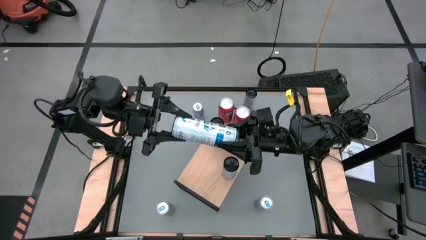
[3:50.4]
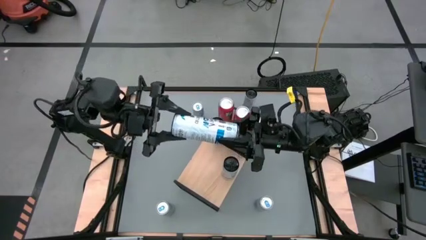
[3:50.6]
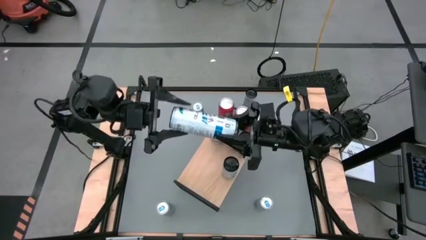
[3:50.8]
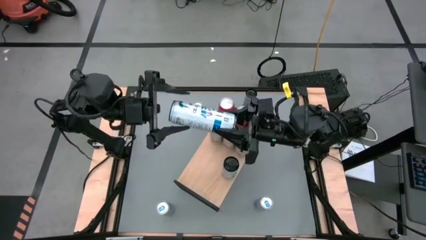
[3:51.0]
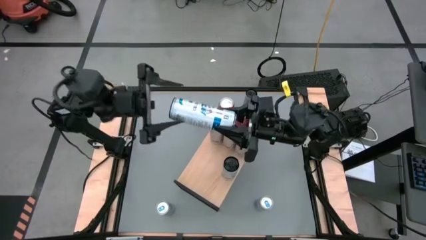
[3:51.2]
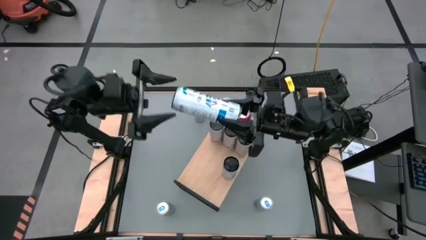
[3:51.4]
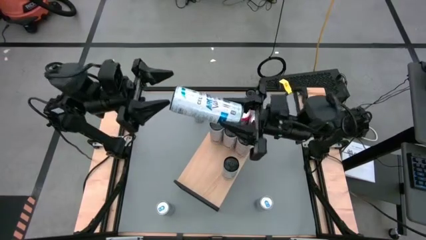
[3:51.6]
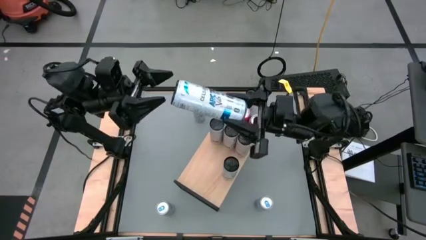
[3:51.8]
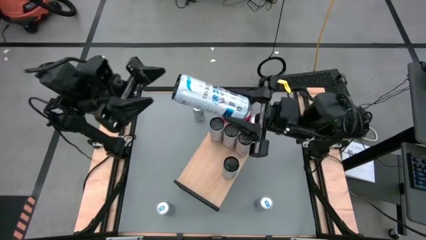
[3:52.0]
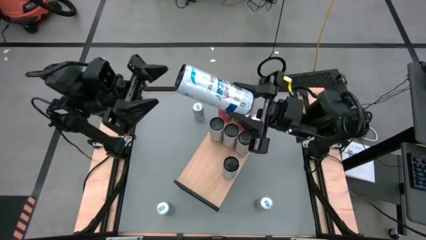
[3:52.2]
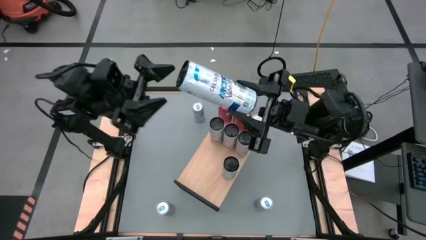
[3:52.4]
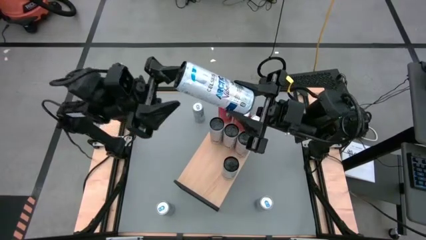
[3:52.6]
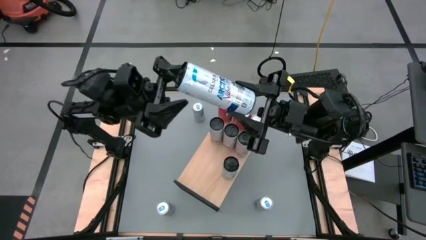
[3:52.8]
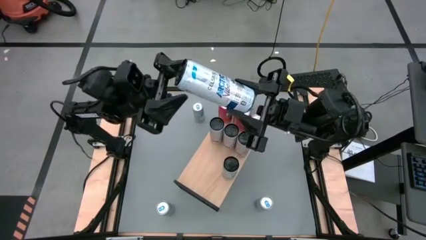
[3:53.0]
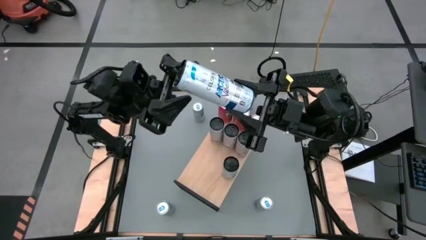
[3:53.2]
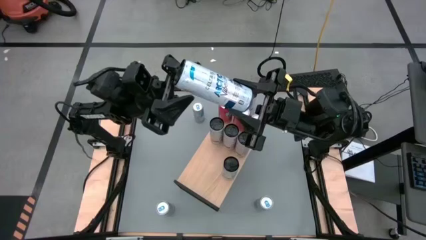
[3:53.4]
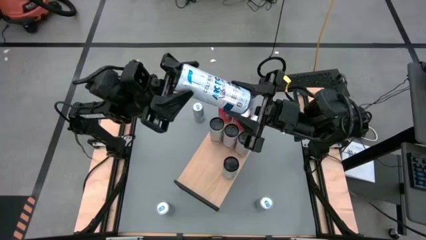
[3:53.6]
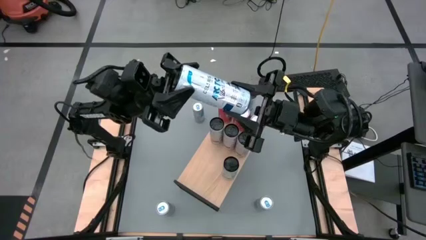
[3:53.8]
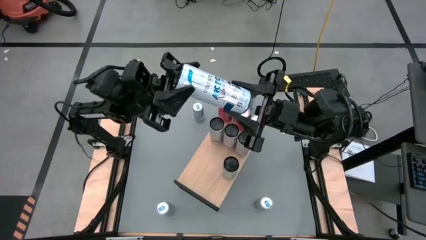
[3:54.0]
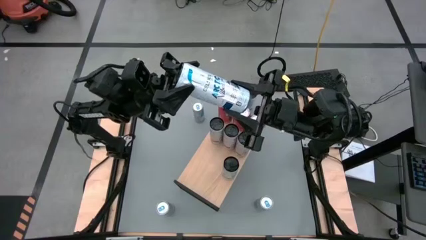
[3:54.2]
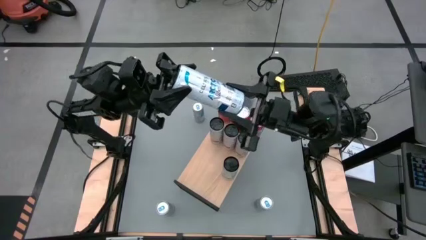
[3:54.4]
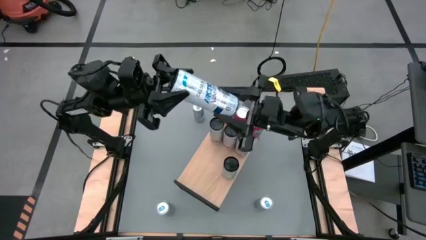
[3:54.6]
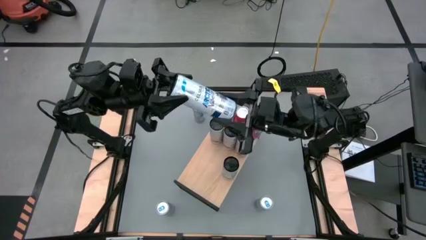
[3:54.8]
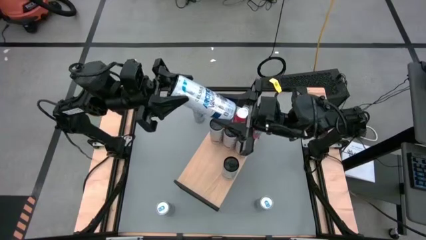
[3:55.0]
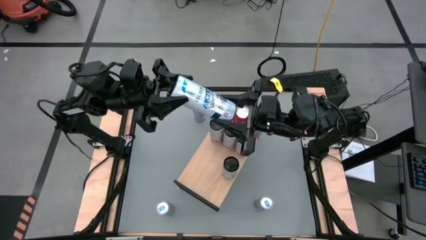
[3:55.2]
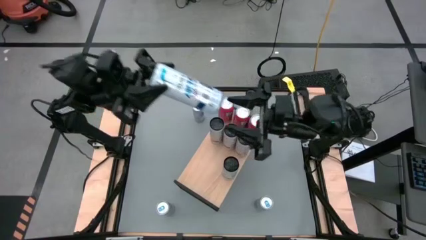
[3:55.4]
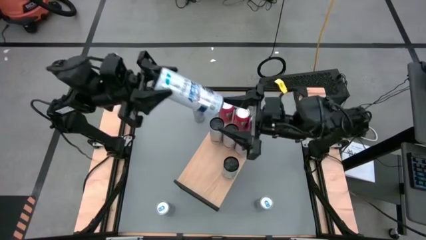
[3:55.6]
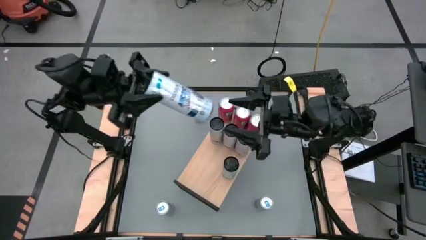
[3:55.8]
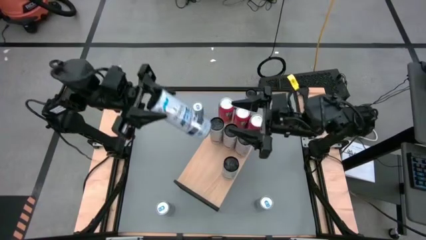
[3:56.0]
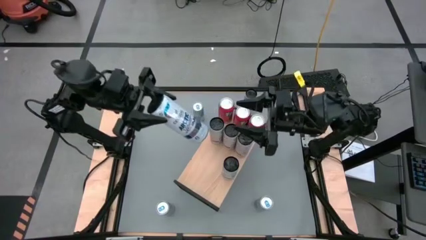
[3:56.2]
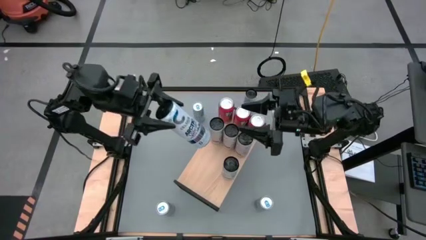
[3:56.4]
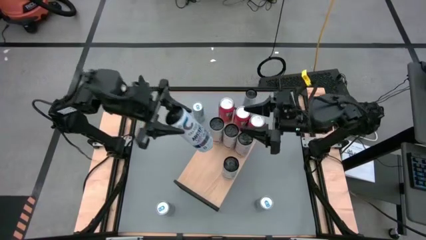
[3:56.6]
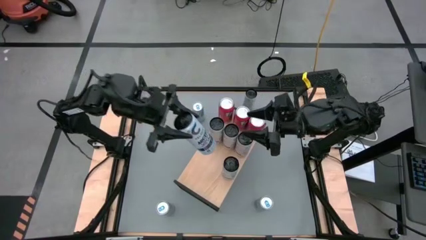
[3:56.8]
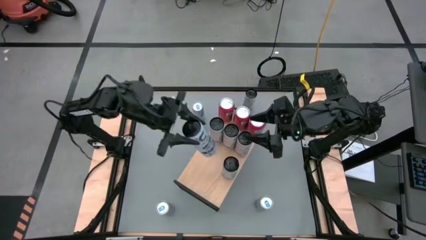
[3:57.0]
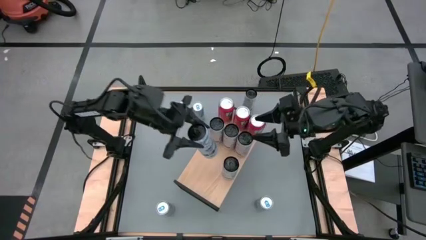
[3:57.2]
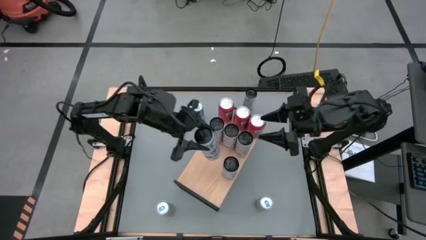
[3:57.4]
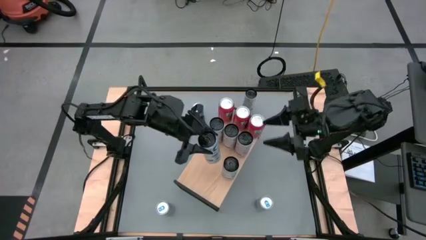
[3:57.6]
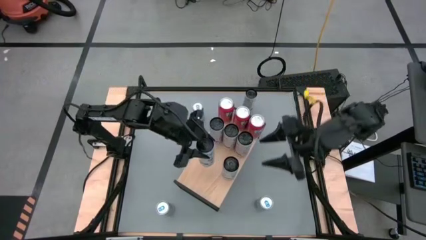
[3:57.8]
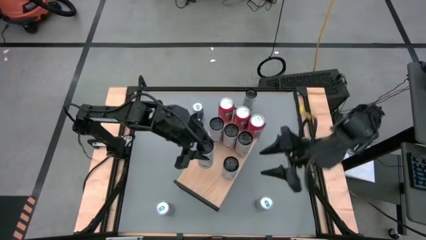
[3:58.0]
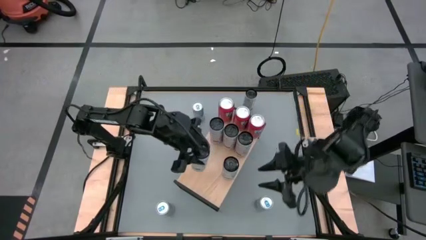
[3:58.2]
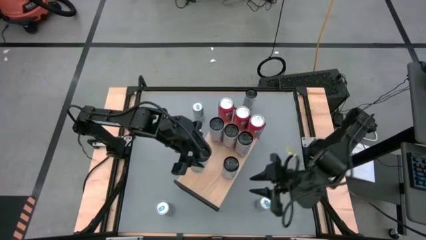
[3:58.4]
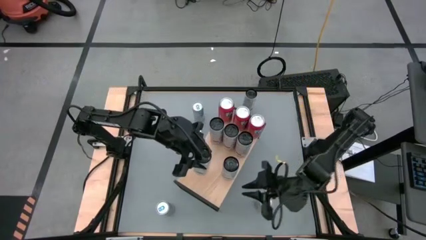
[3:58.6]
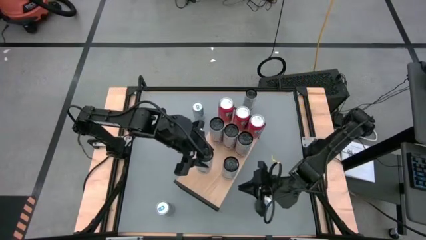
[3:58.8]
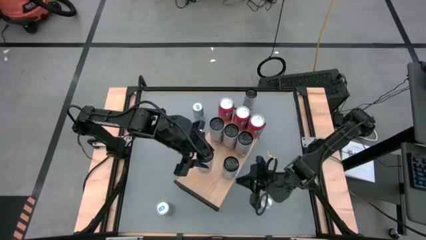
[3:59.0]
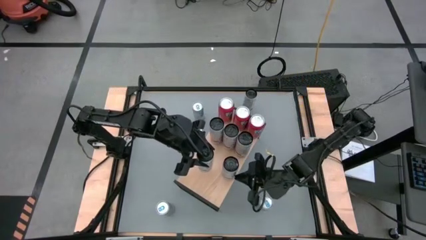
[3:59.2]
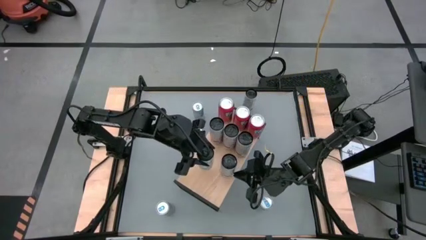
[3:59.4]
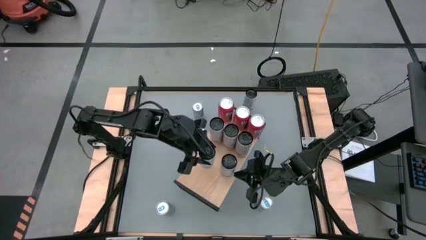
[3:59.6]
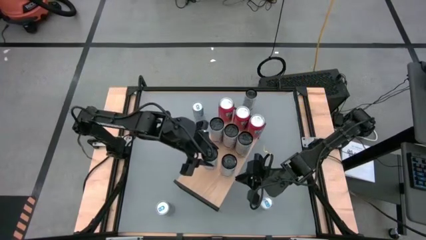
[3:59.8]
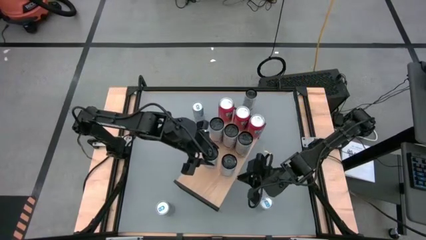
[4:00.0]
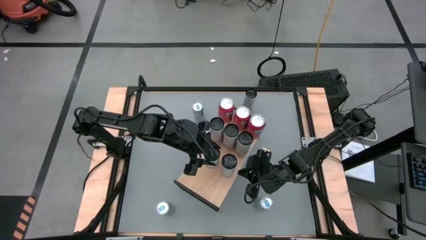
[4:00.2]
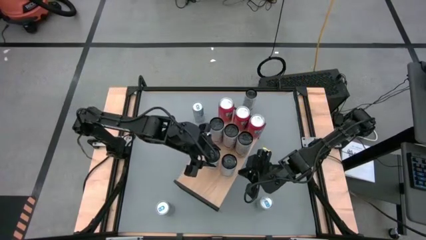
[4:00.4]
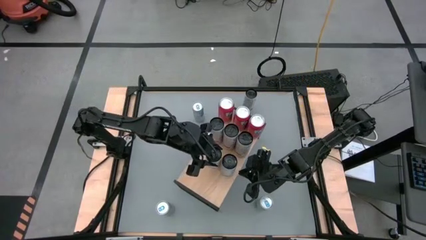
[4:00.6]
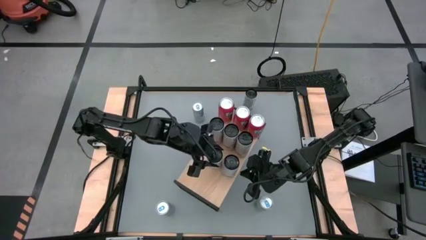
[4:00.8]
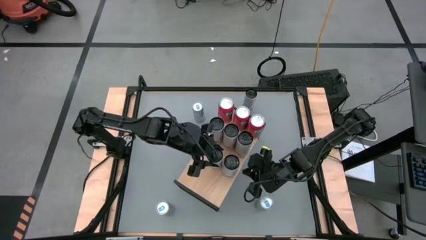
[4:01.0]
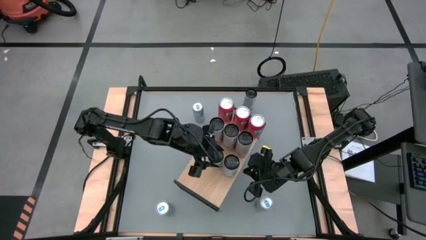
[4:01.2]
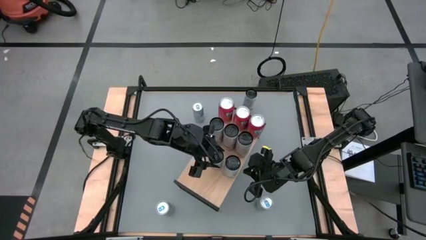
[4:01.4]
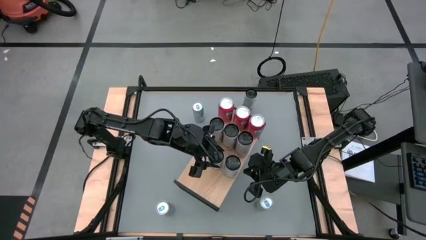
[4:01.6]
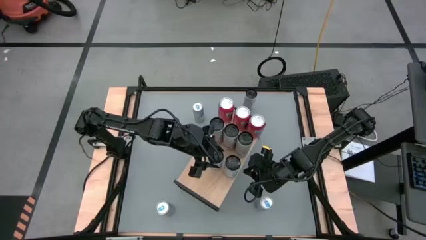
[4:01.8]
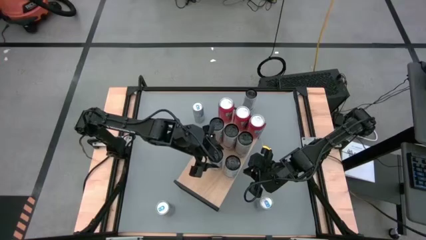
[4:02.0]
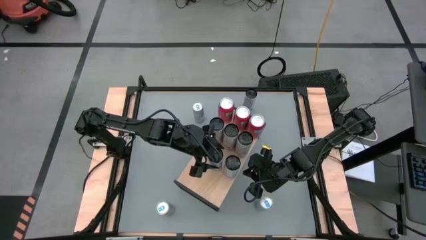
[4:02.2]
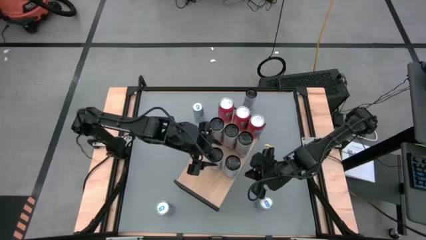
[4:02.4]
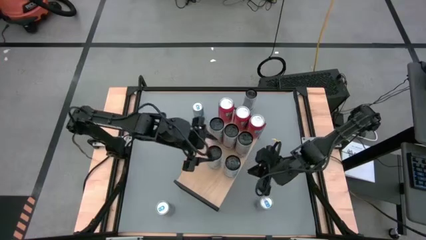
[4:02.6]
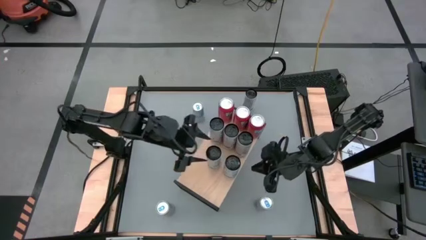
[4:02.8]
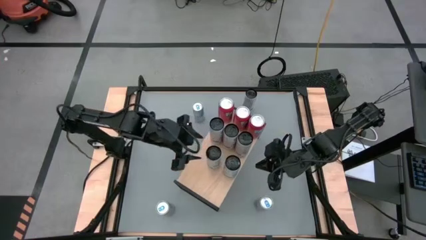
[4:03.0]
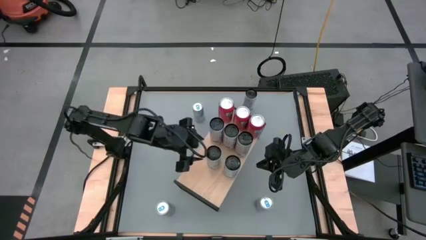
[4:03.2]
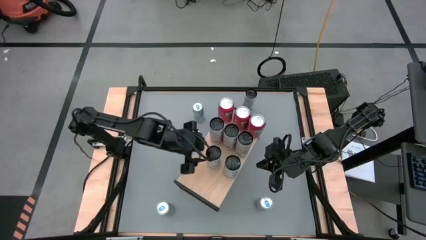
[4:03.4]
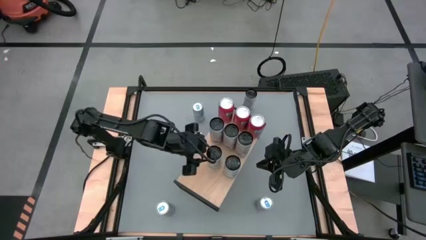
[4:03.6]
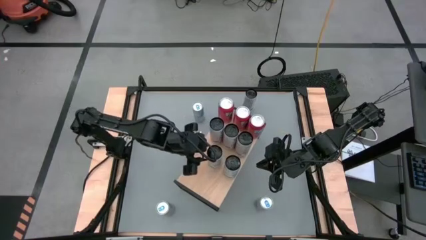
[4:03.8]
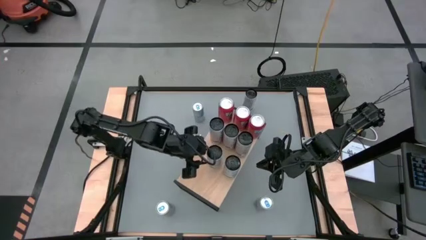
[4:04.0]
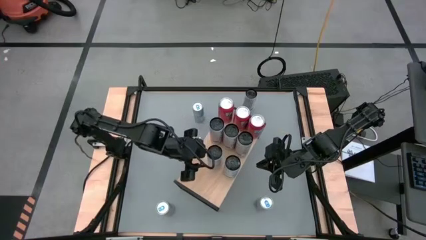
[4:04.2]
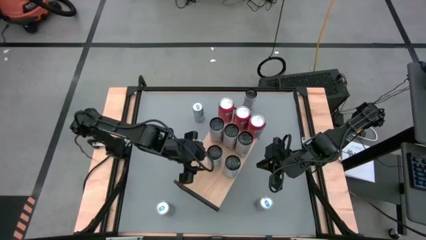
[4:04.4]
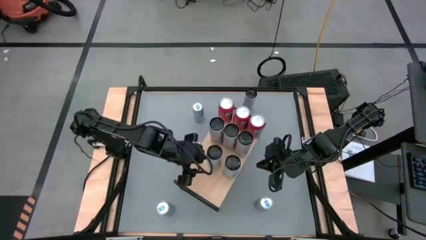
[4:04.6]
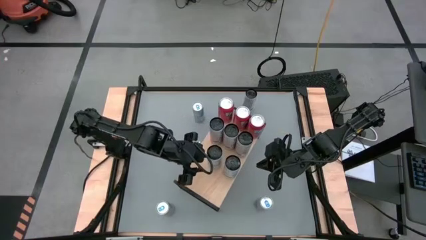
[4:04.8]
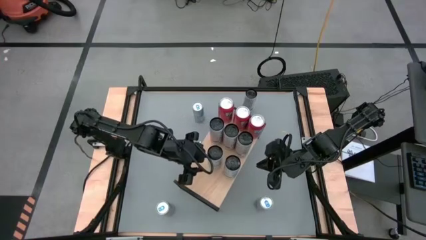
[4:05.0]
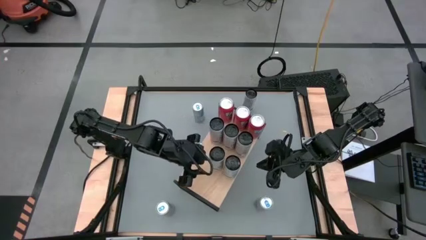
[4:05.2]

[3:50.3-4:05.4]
Task: Place canned beverage on shelf
Put the white blue soda can on the shelf aligned with the other white blue soda cans
